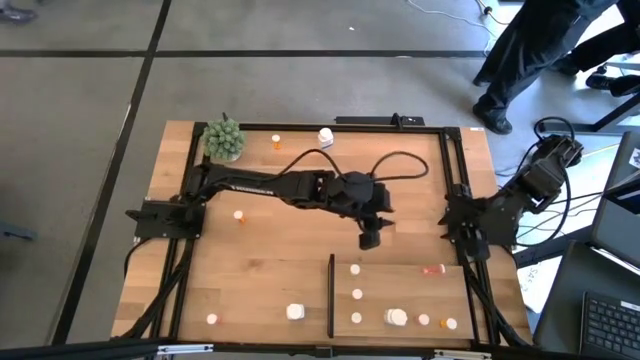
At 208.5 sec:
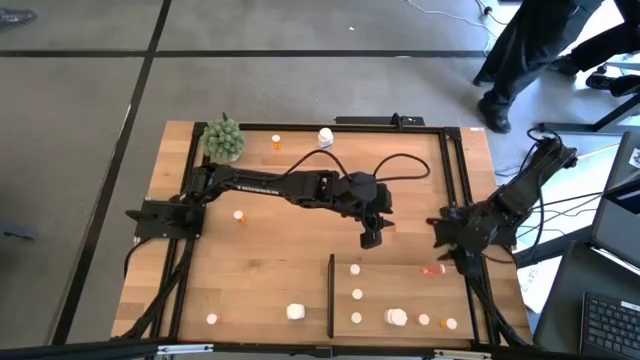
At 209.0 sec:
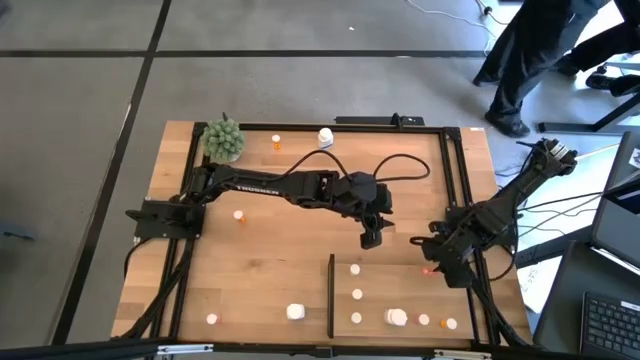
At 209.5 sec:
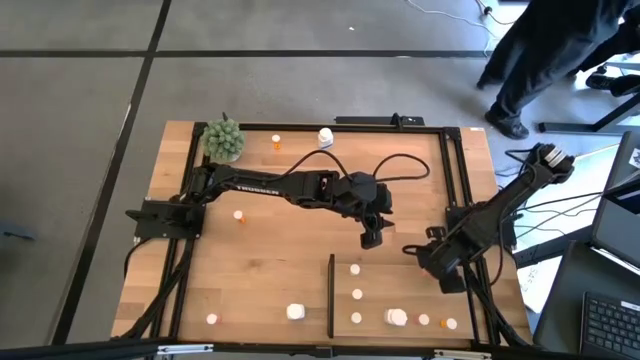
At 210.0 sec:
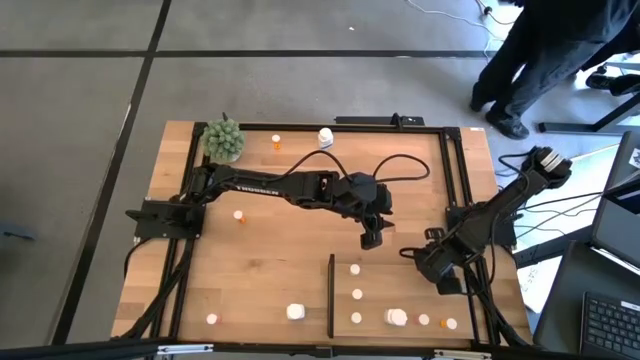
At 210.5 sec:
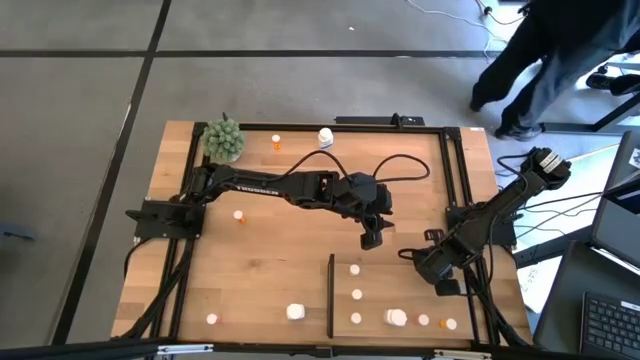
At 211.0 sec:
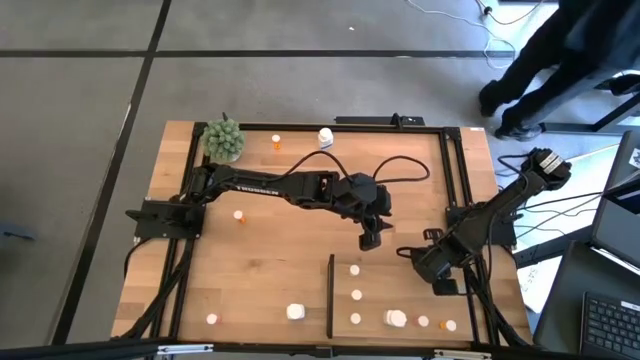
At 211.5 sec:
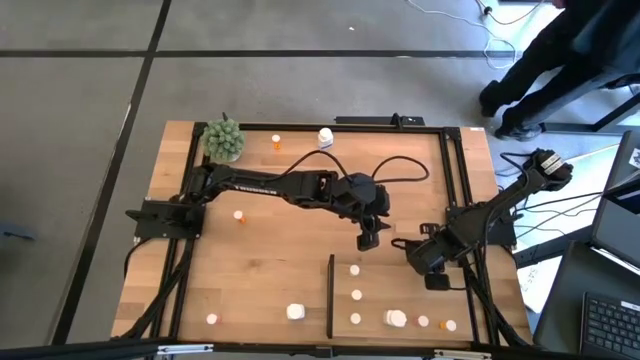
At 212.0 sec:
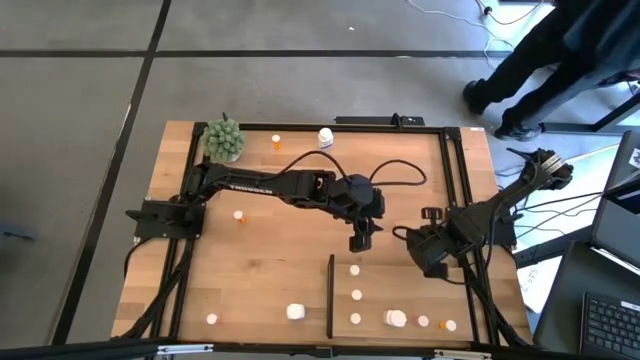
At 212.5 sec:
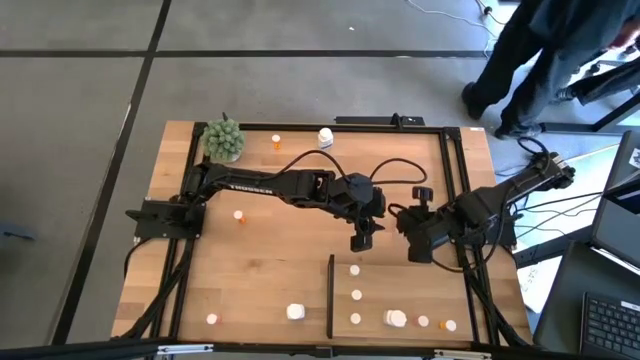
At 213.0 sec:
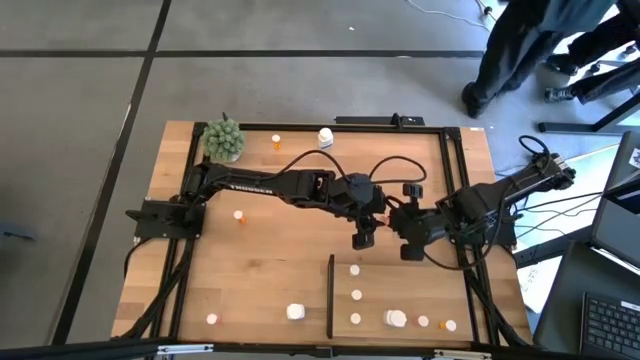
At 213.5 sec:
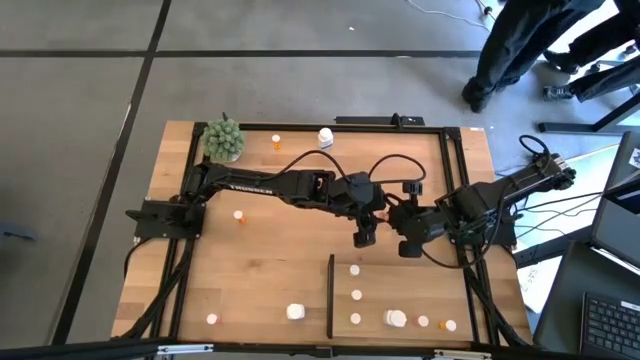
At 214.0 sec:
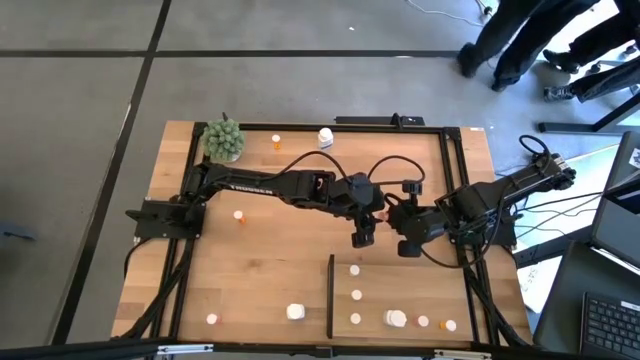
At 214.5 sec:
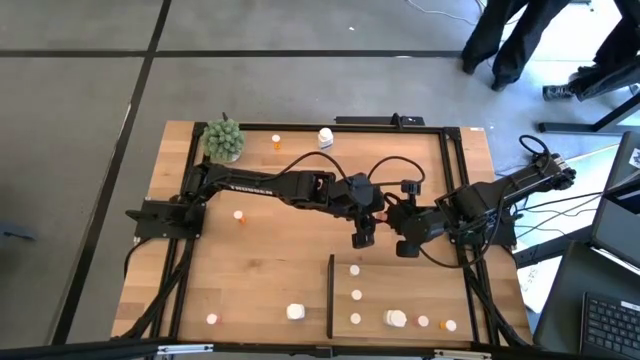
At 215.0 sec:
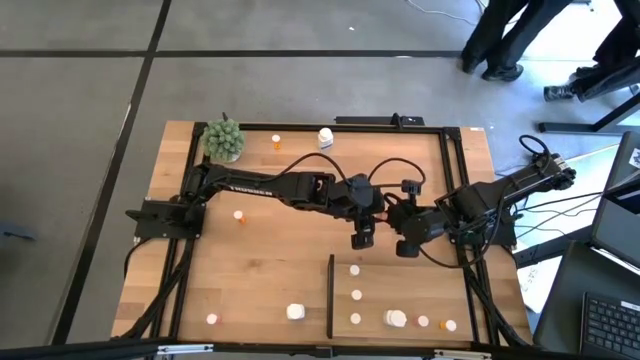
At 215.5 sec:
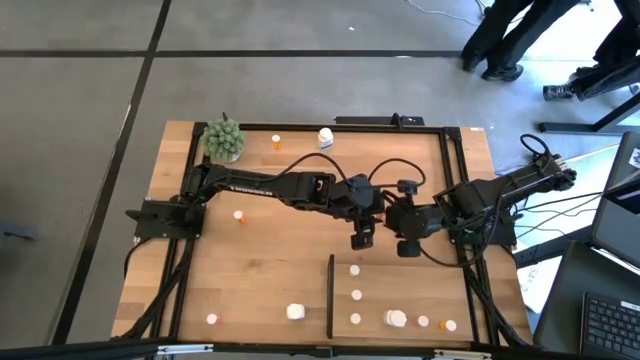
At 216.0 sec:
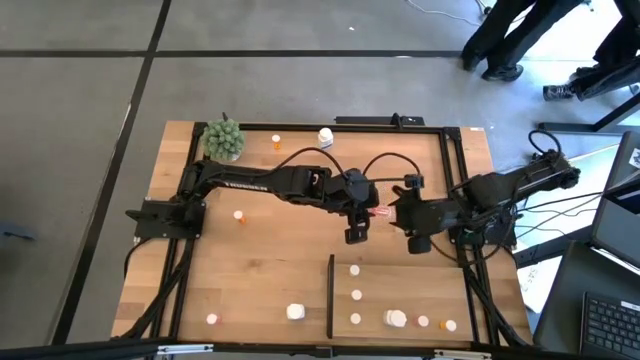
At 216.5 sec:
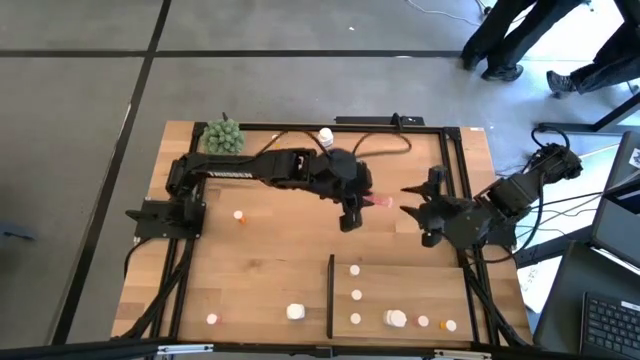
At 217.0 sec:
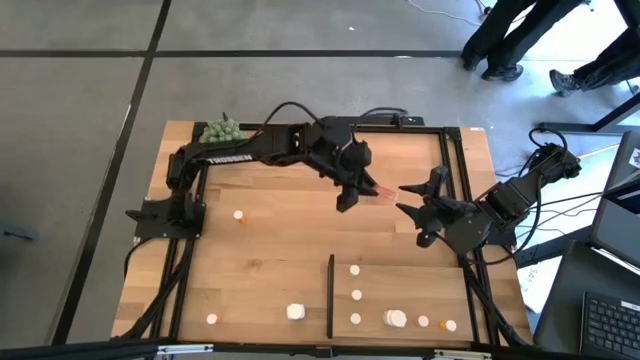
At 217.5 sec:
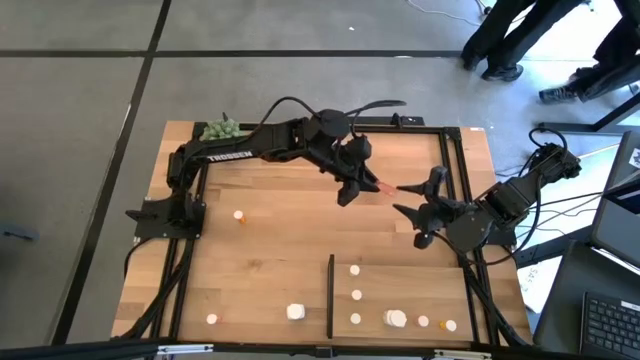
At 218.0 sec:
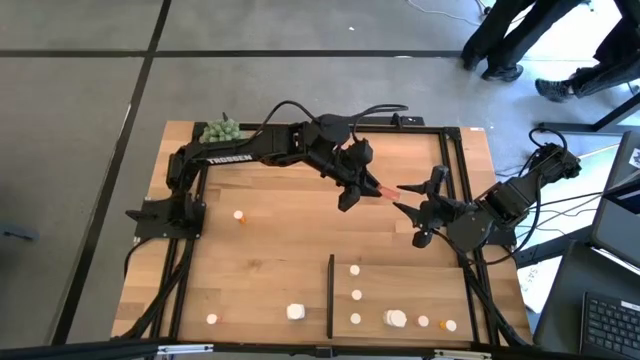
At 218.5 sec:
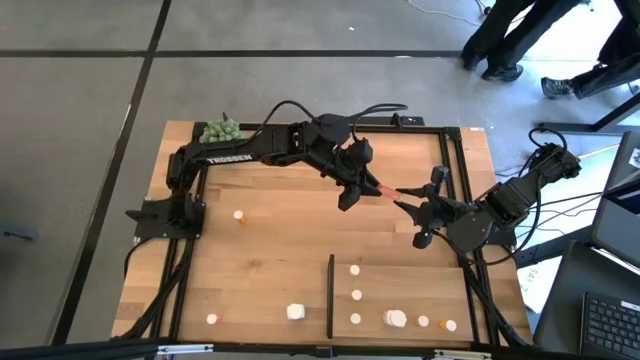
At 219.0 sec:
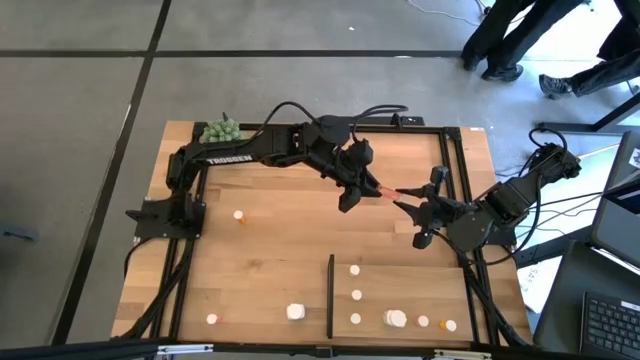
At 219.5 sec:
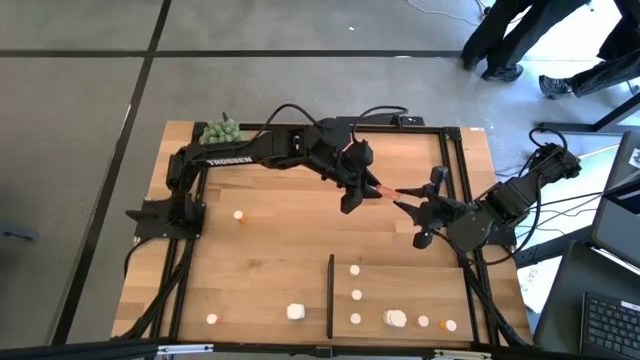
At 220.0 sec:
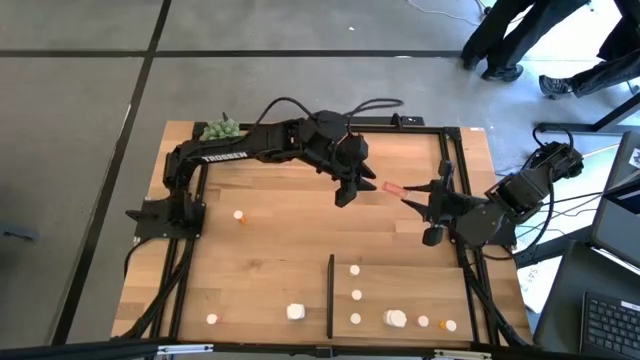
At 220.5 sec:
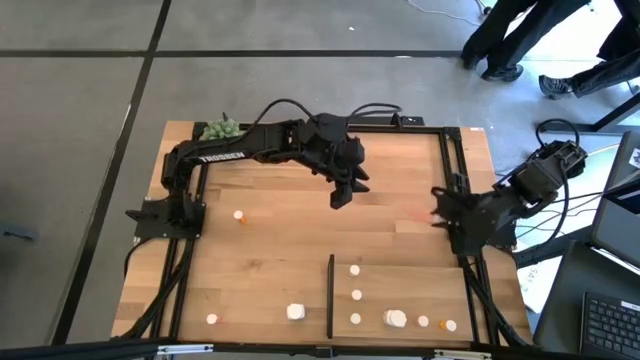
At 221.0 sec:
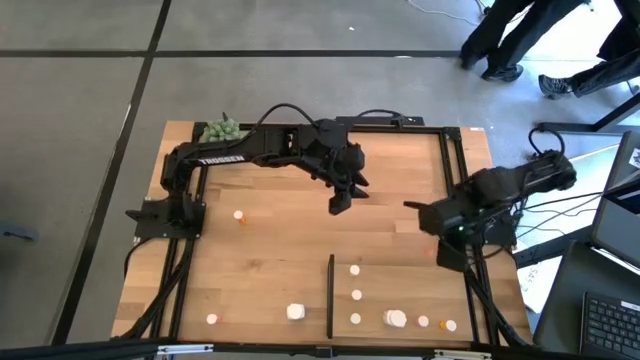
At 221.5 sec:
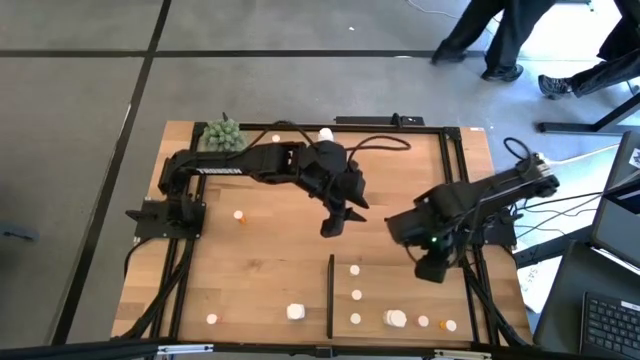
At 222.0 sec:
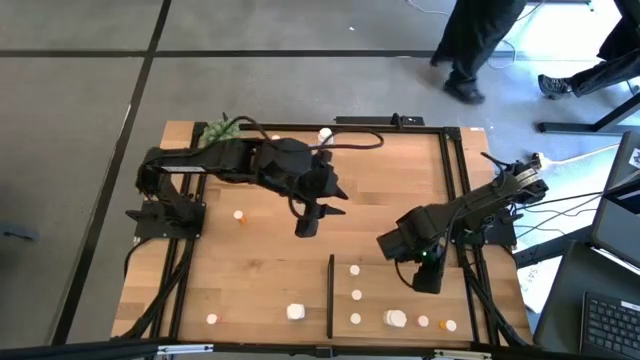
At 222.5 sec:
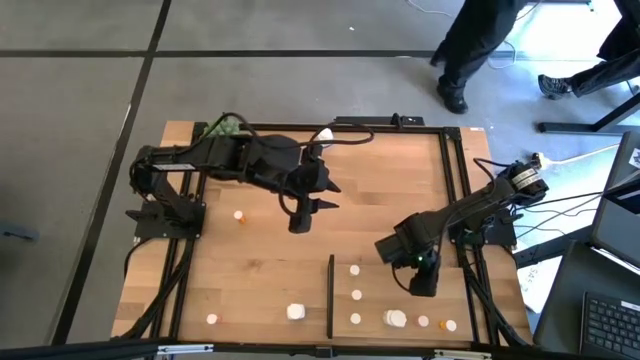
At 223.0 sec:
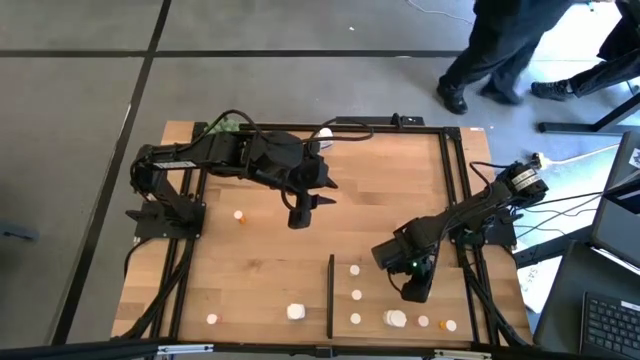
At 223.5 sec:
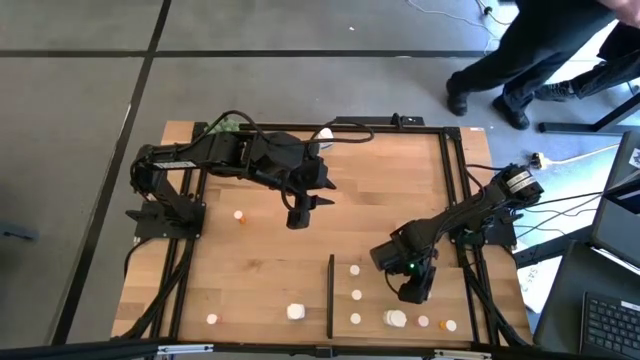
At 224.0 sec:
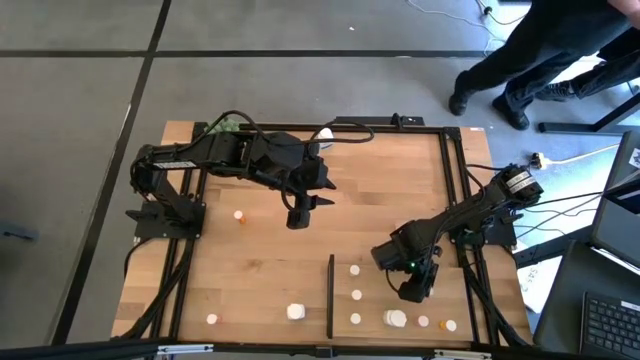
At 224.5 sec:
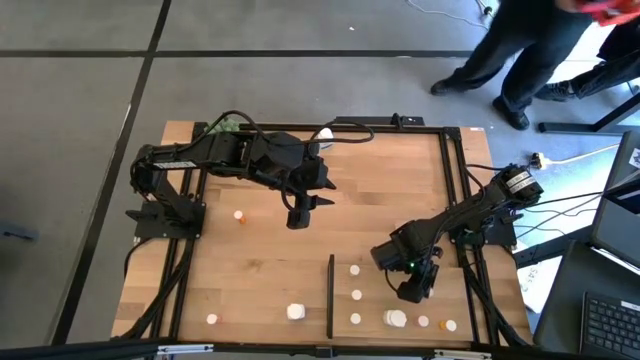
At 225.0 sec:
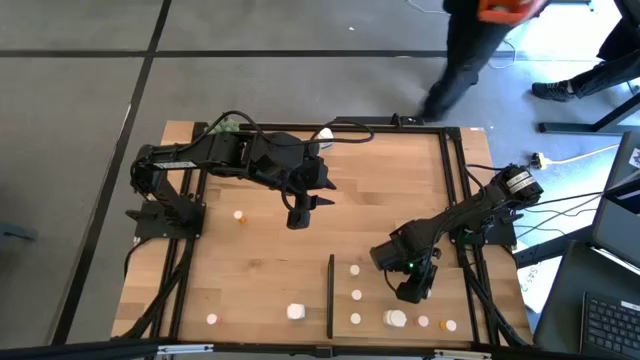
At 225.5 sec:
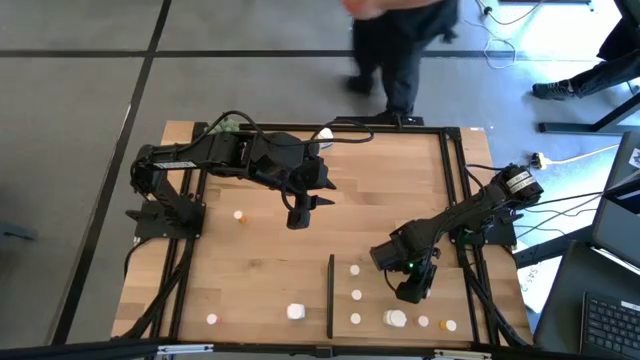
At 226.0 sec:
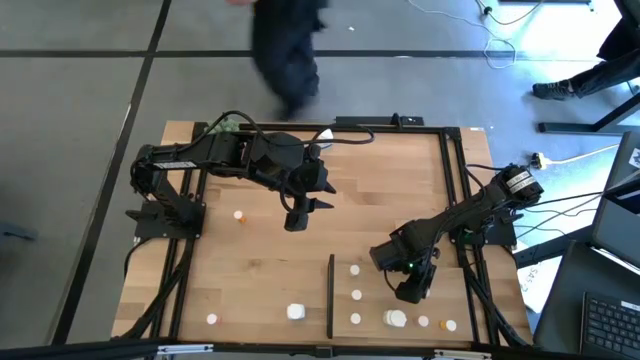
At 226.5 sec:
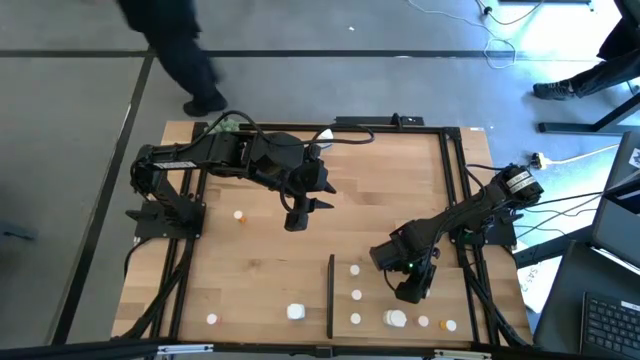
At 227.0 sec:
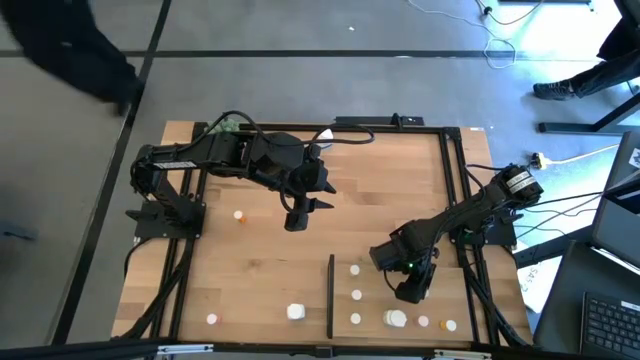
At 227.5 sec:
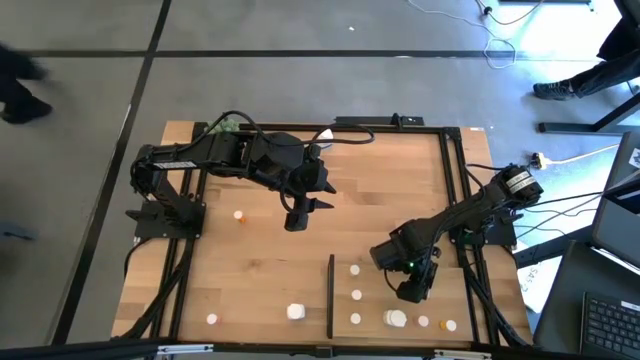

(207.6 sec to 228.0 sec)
Task: Pick and place medicine bottles onto shelf by color
Put the top pink pill bottle on the shelf aligned with the other pink pill bottle

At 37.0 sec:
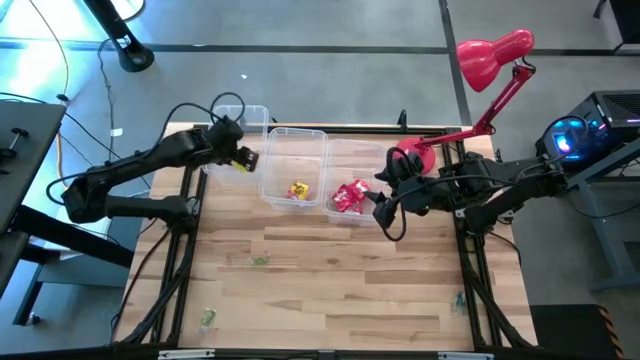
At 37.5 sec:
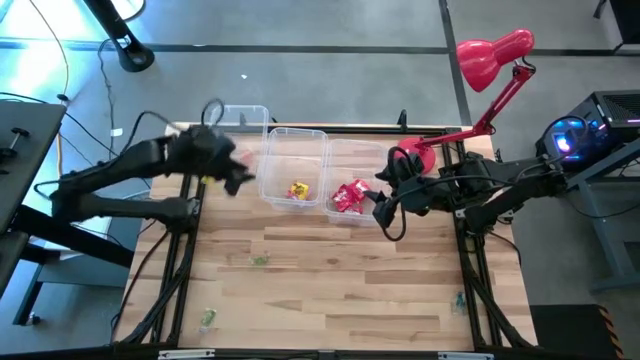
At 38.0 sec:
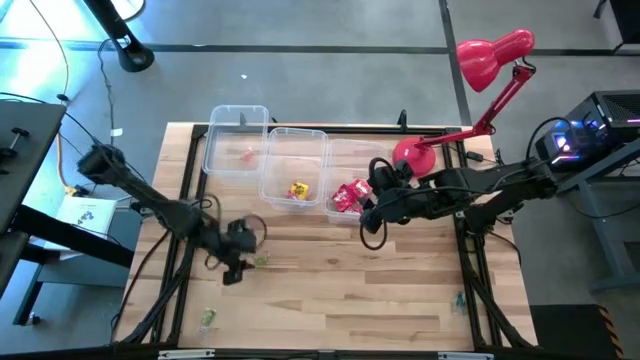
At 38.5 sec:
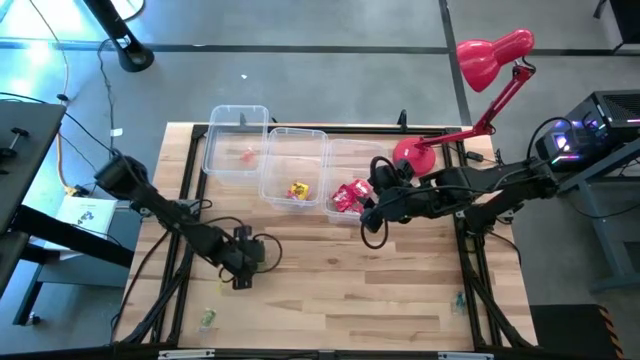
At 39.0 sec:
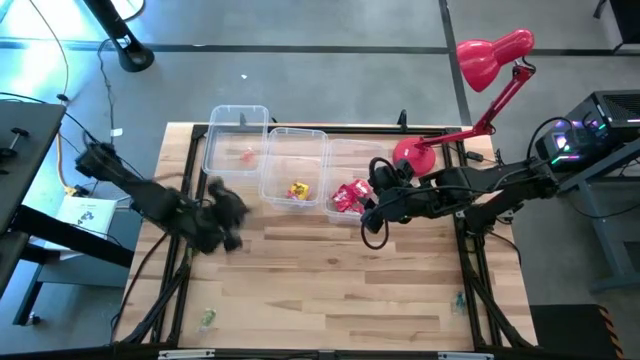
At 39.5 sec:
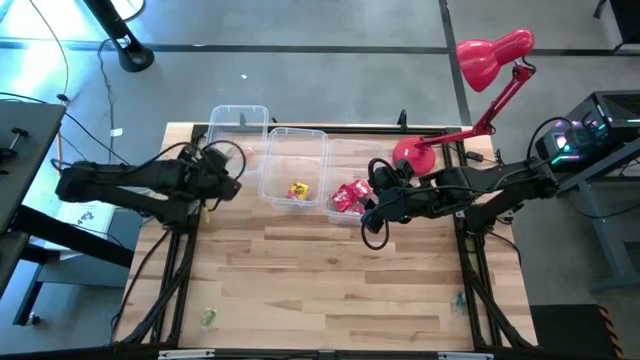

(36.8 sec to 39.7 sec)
Task: Sort candy
Put the middle left green gummy into the top left transparent bin
